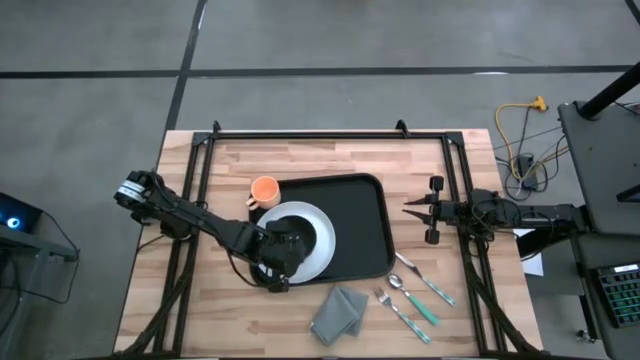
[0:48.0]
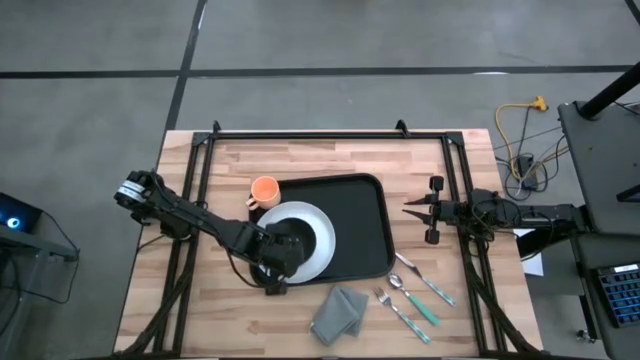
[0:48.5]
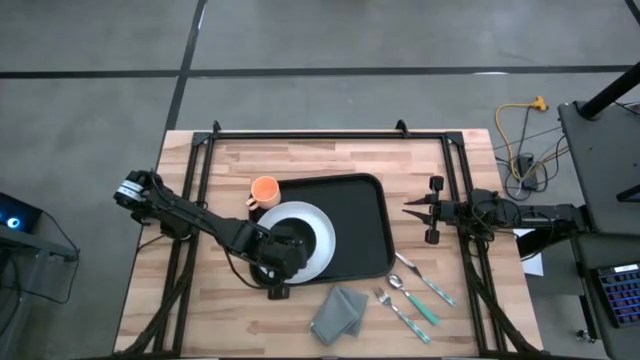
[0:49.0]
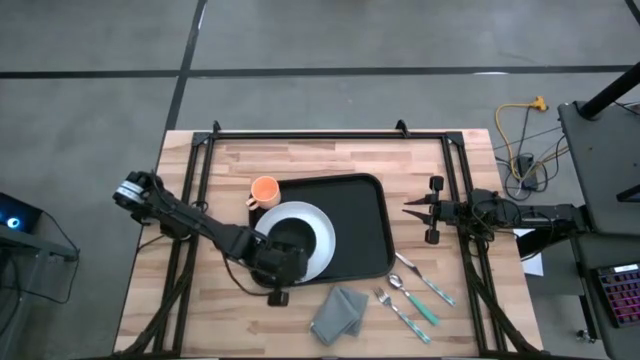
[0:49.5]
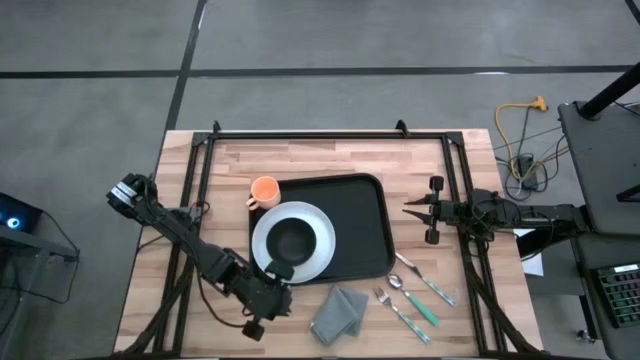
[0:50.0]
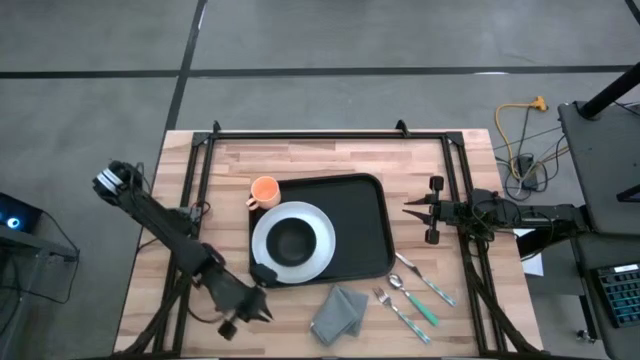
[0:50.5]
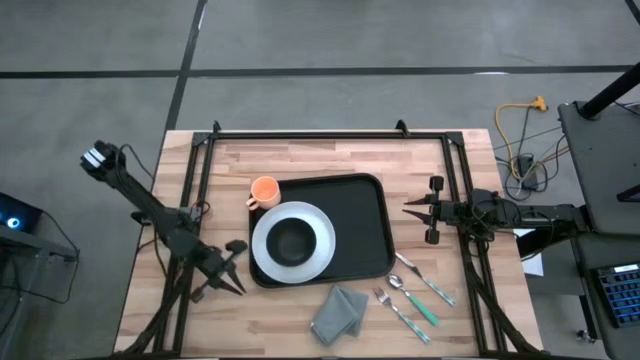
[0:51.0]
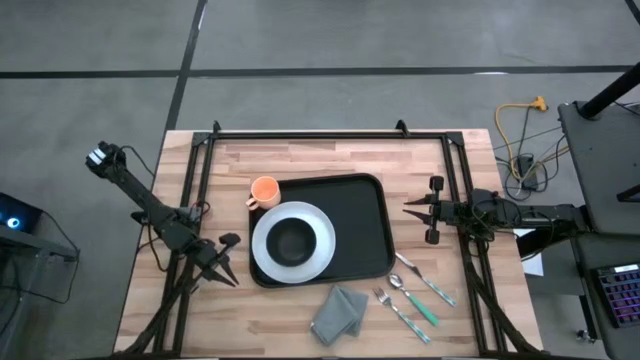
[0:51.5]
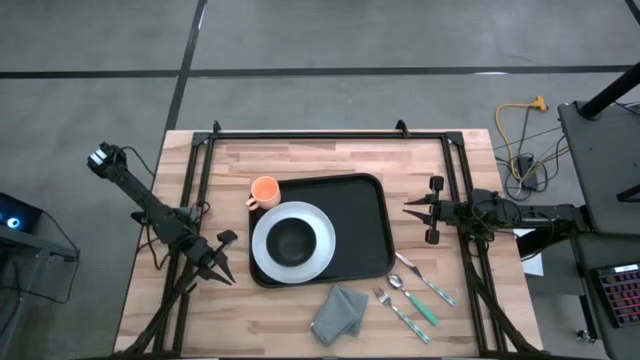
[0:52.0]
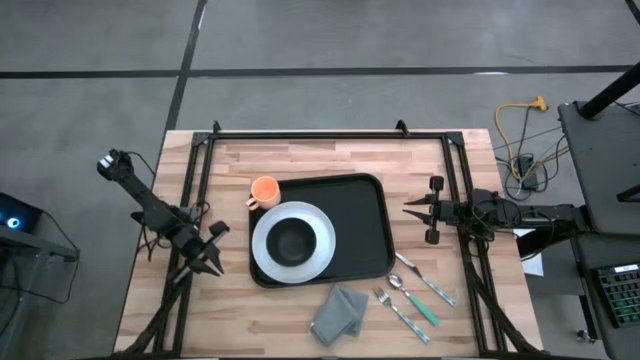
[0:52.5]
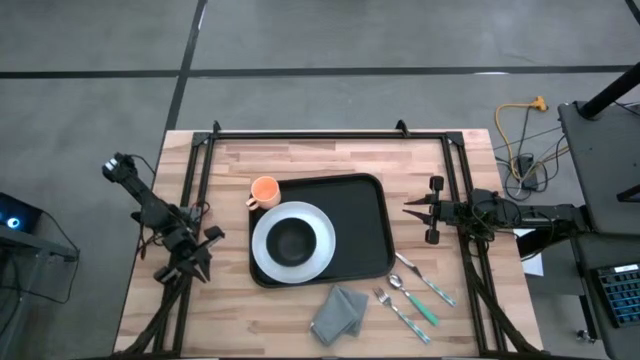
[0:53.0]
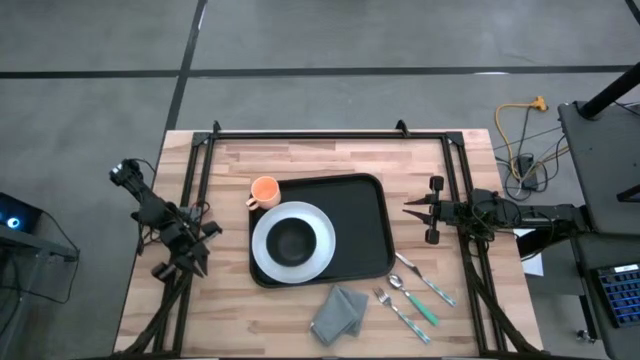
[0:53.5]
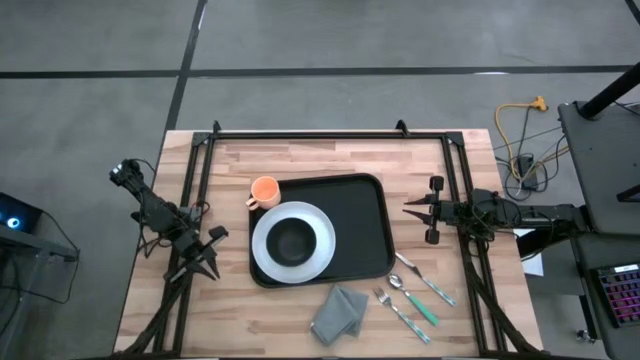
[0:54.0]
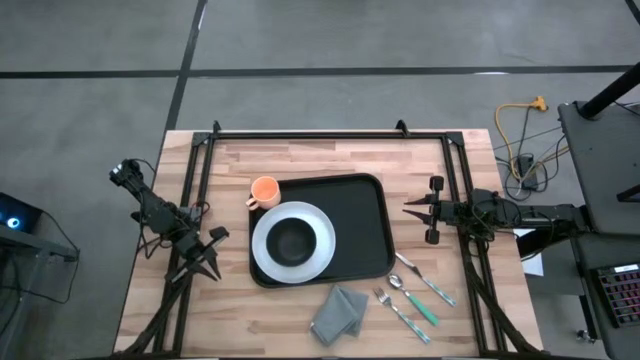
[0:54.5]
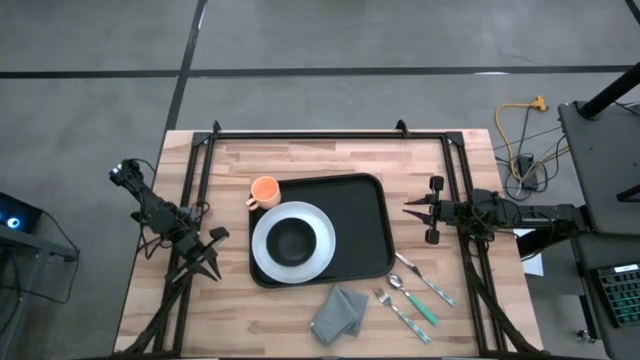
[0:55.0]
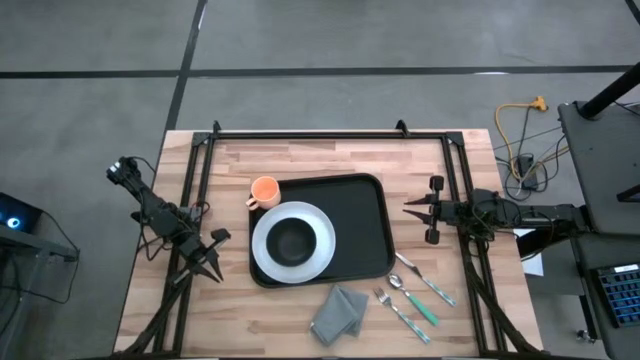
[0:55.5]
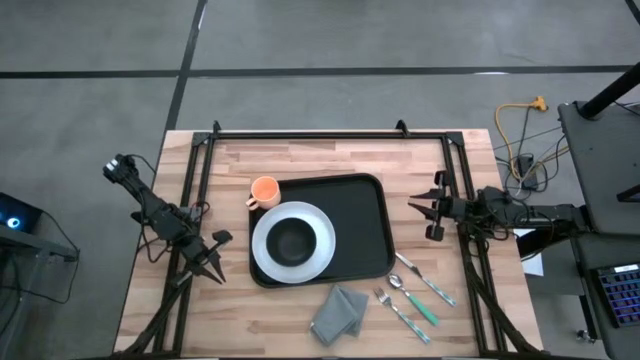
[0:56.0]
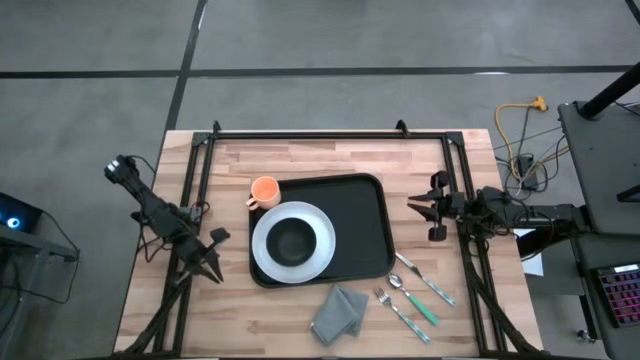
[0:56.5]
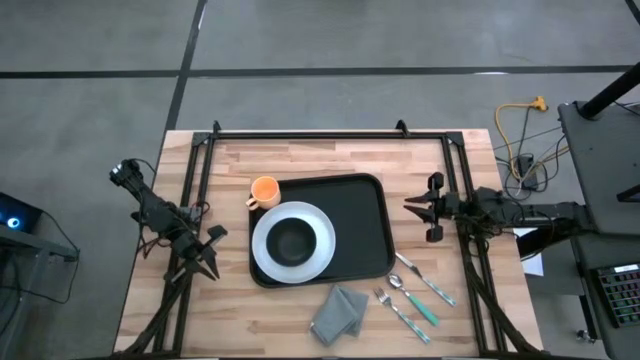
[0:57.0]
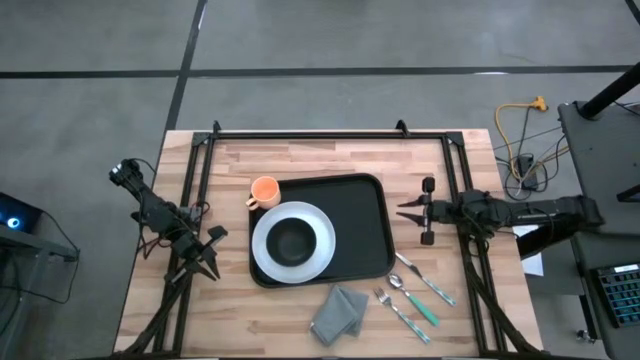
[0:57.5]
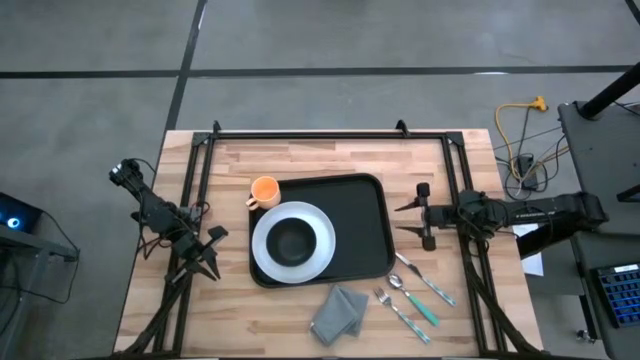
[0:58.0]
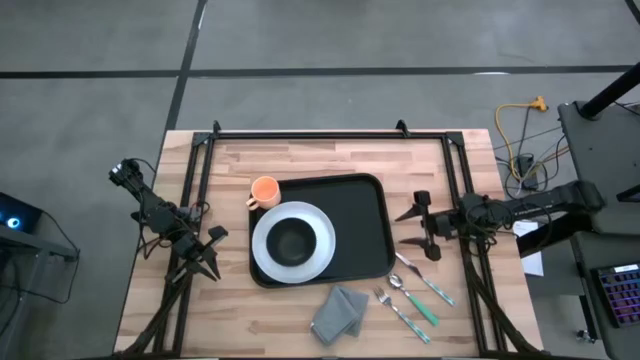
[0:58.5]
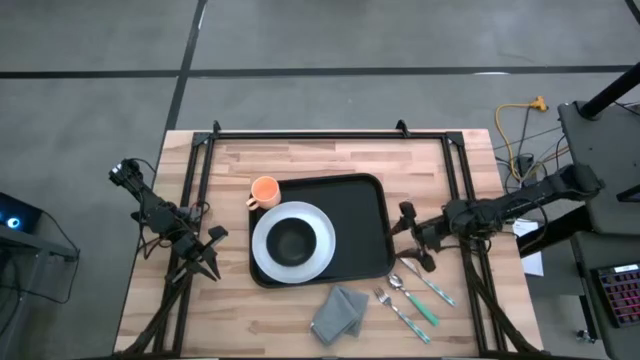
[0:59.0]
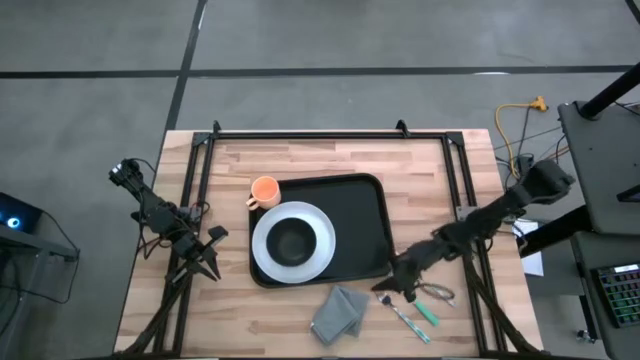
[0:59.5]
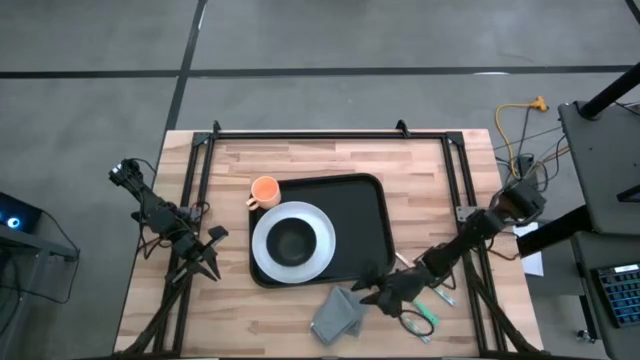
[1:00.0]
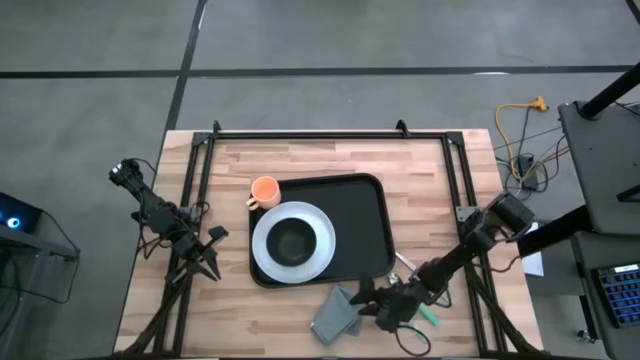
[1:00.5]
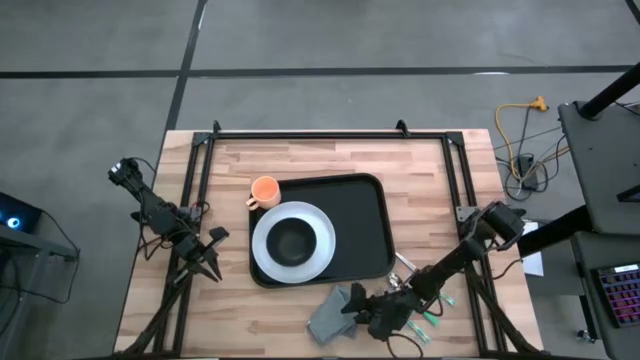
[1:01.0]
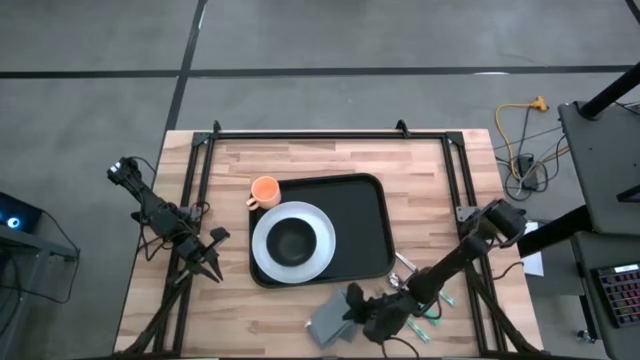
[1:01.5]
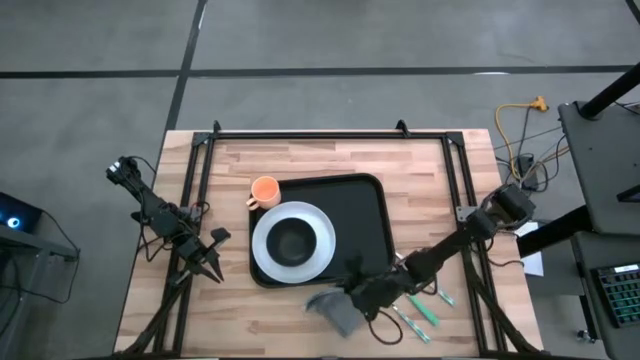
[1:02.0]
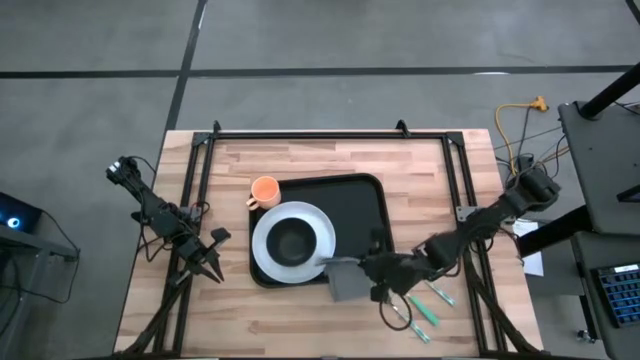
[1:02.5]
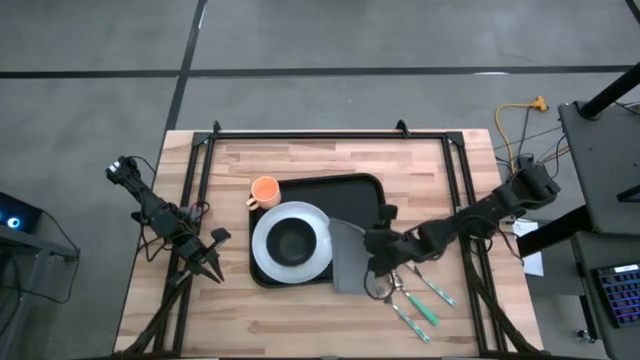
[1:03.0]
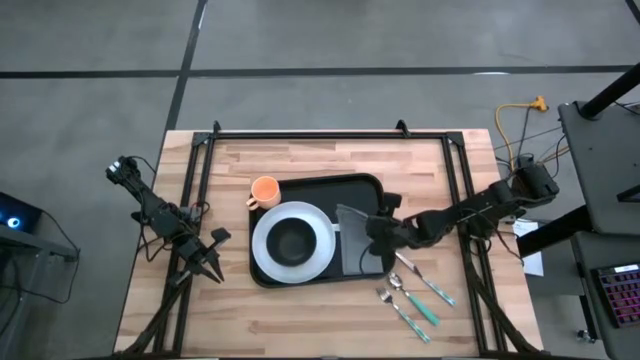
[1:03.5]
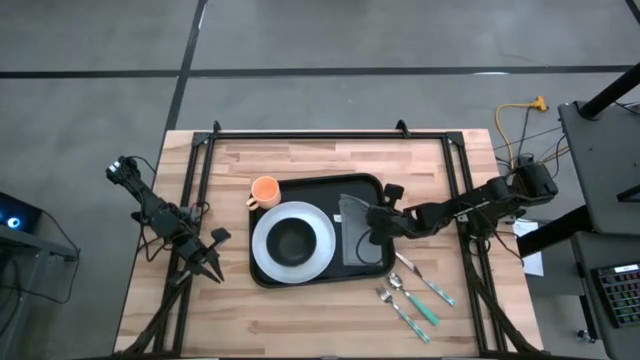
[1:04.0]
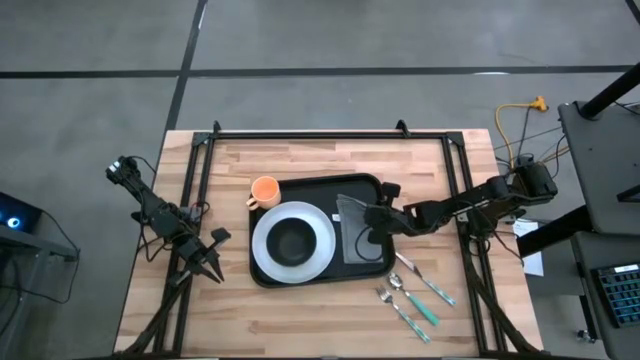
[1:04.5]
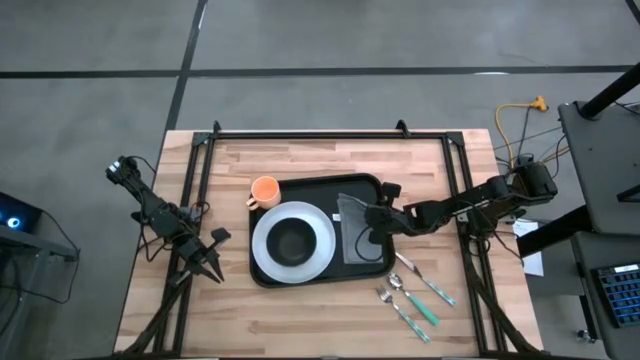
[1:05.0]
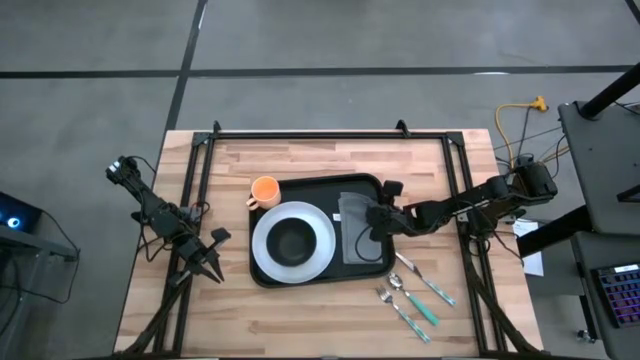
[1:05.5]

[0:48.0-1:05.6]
Task: Set up tray
Put the gray napkin on the black serving tray to the right of the white plate

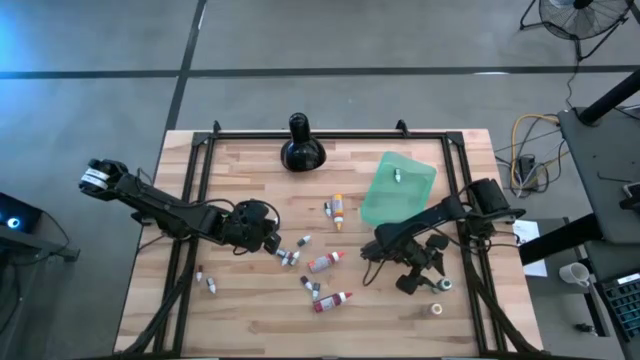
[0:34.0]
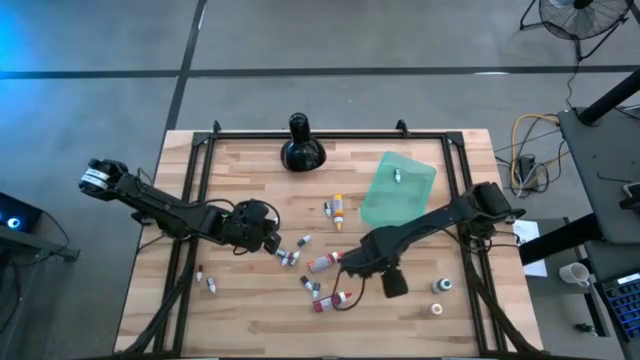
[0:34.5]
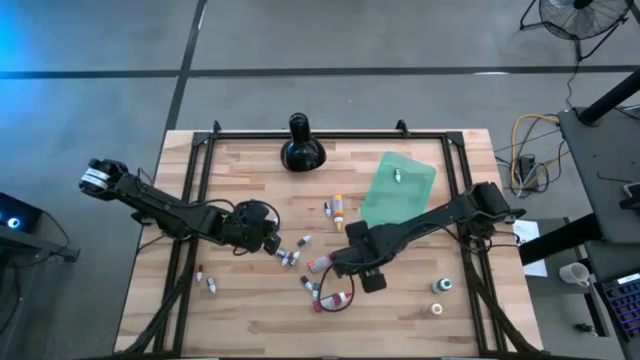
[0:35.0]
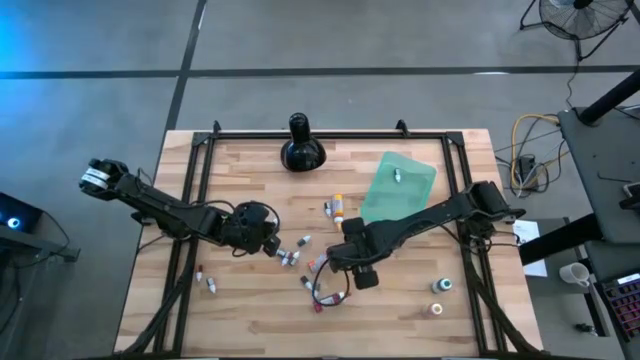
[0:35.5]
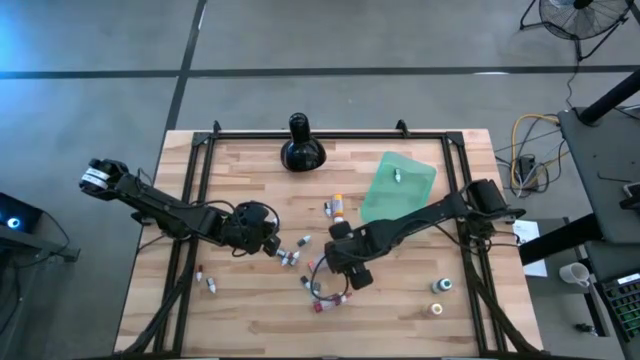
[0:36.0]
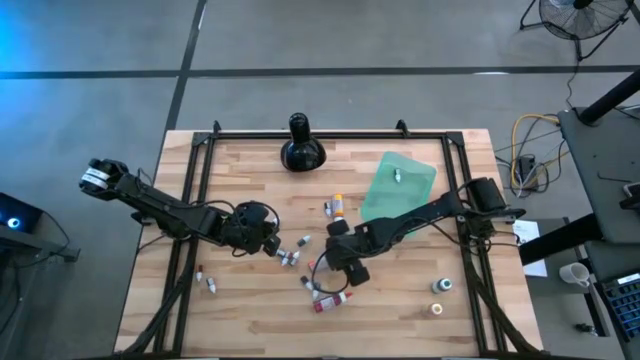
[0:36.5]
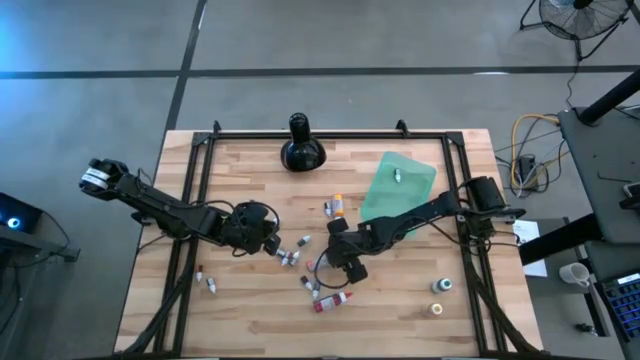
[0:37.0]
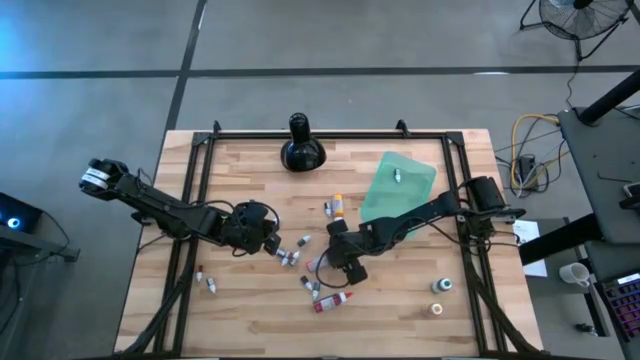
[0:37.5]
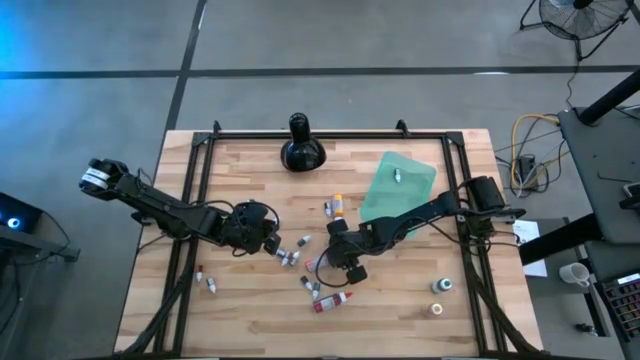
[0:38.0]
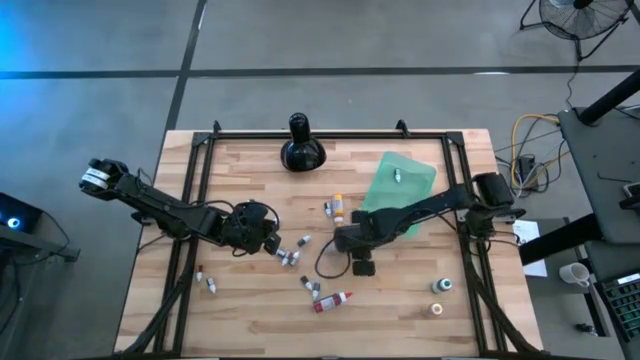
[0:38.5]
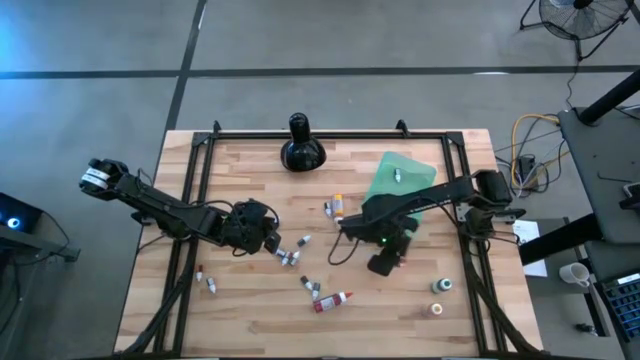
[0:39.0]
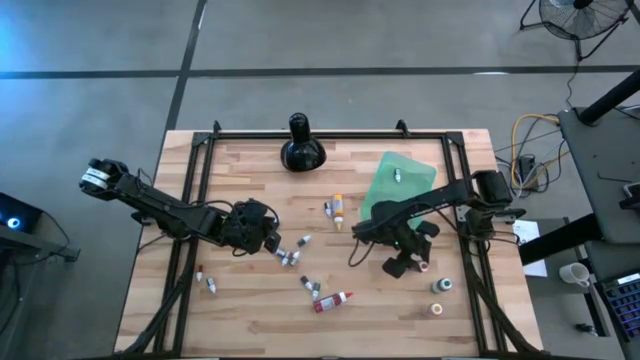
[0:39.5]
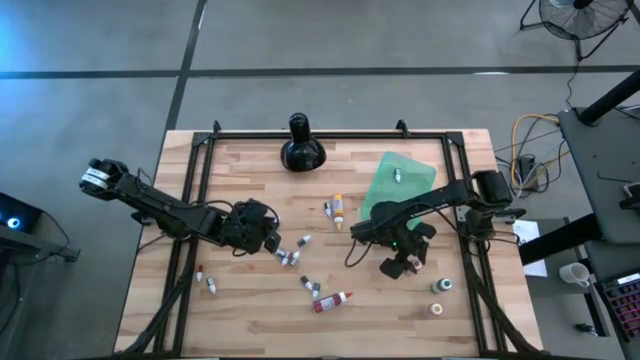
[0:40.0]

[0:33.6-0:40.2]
Task: Pick & Place food coloring
Adjust the large orange food coloring bottle food in the table
